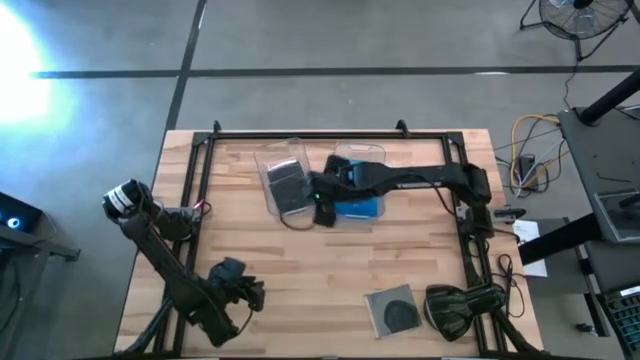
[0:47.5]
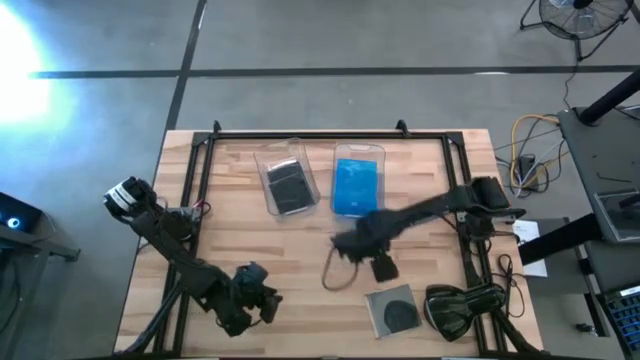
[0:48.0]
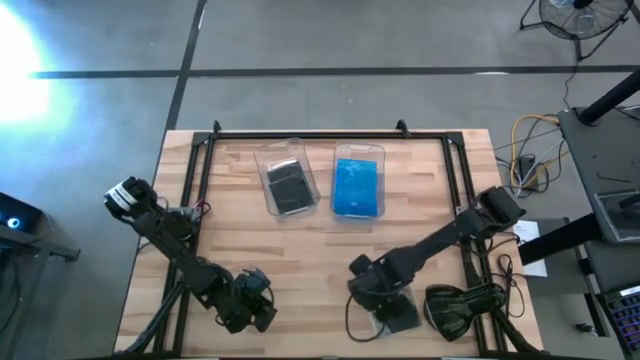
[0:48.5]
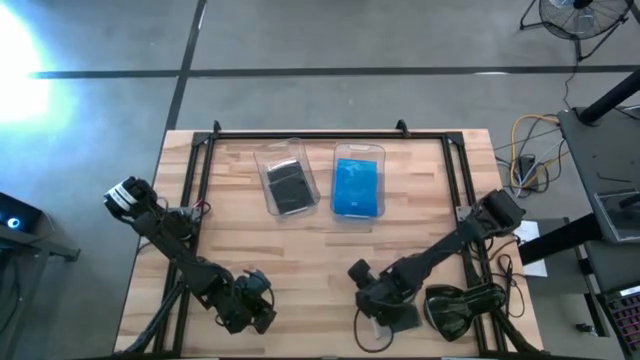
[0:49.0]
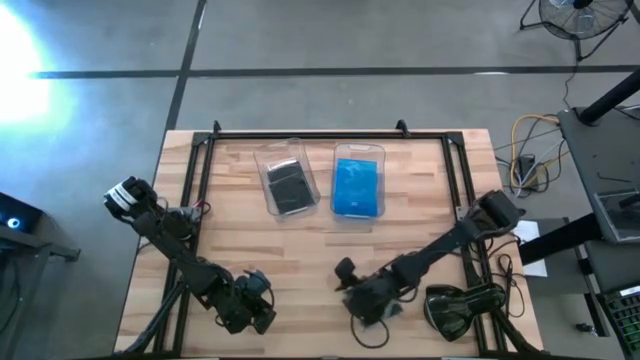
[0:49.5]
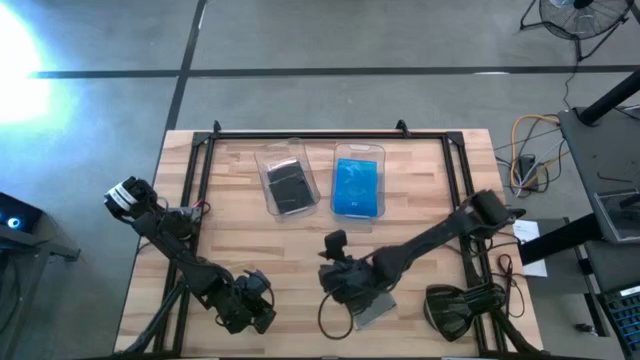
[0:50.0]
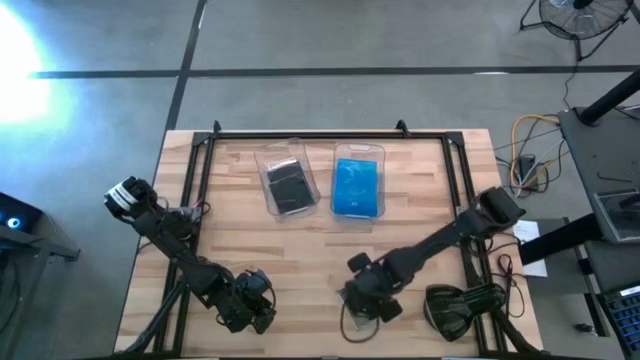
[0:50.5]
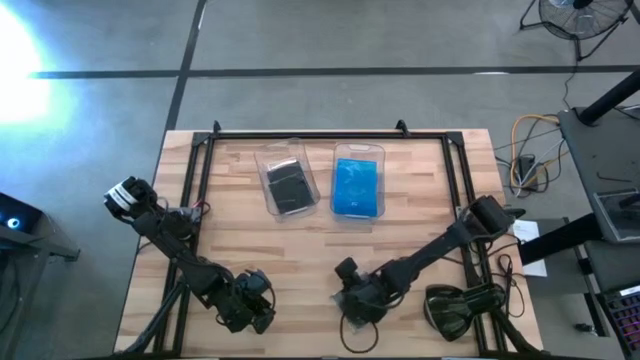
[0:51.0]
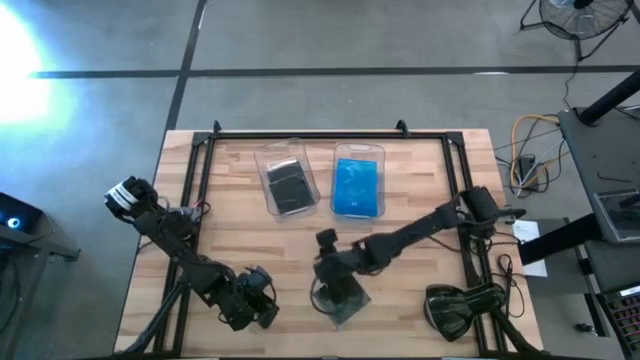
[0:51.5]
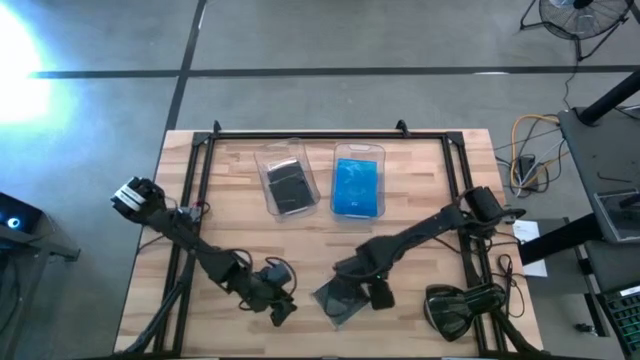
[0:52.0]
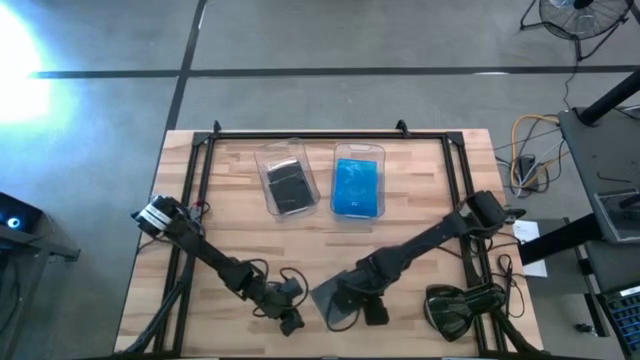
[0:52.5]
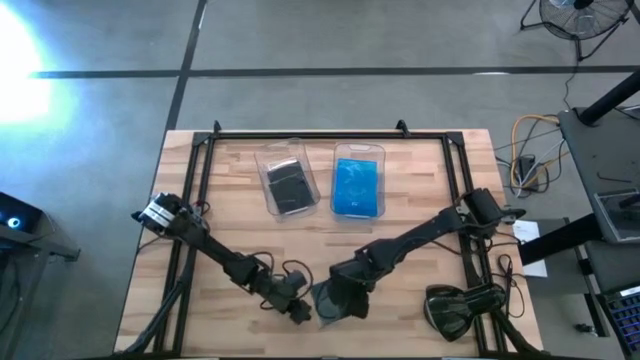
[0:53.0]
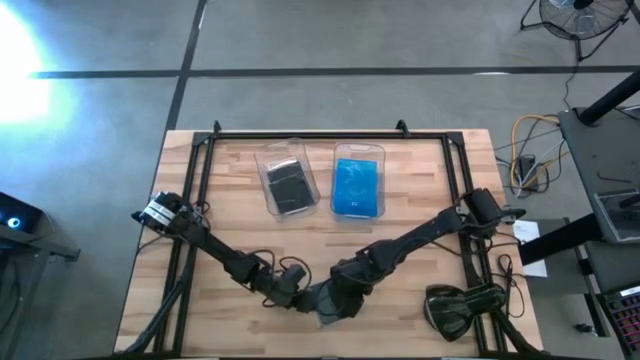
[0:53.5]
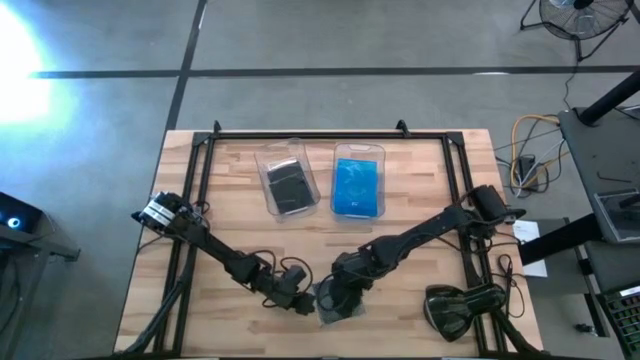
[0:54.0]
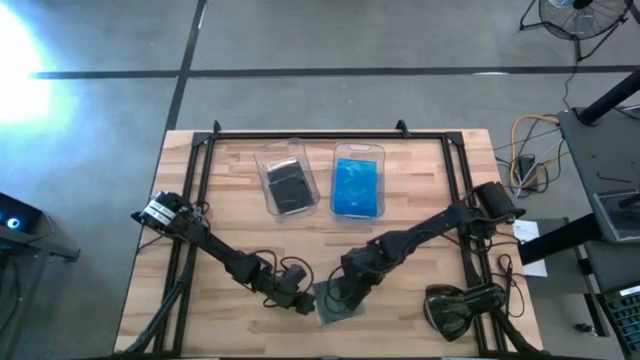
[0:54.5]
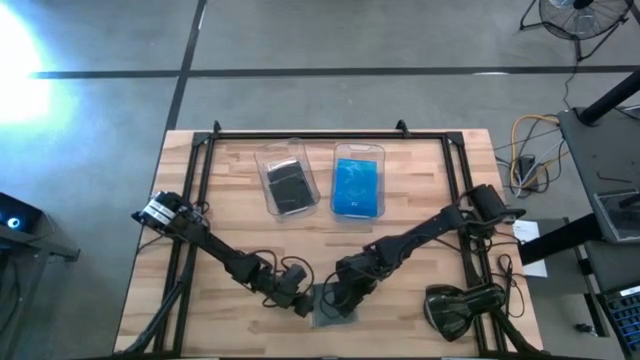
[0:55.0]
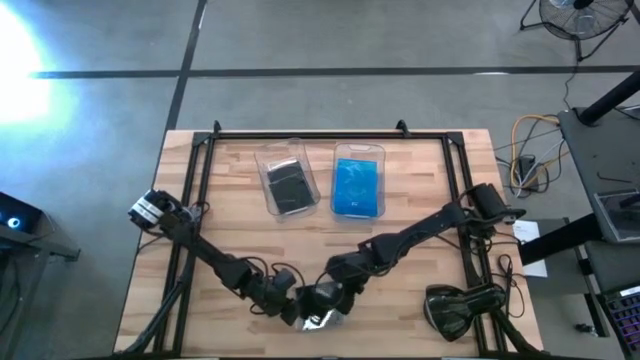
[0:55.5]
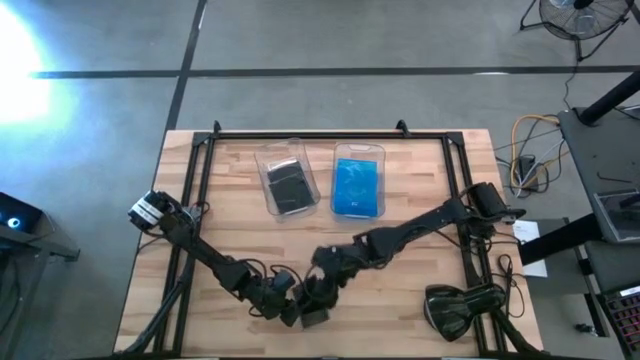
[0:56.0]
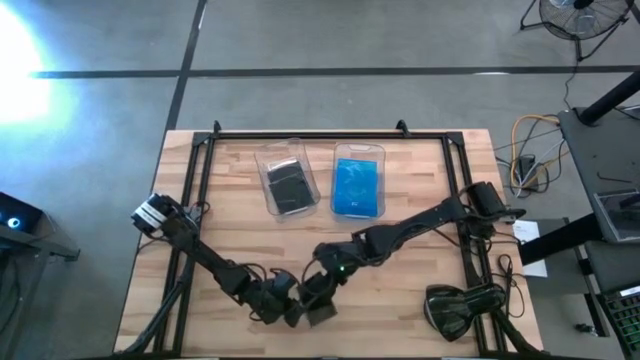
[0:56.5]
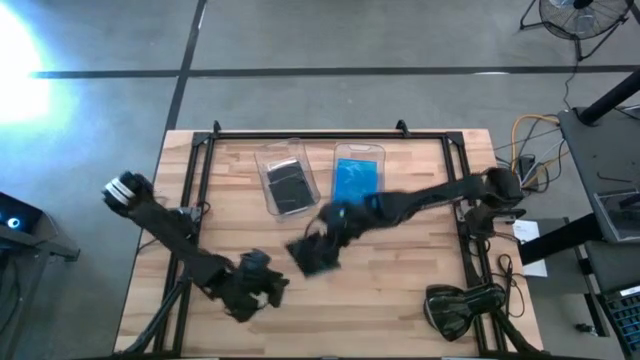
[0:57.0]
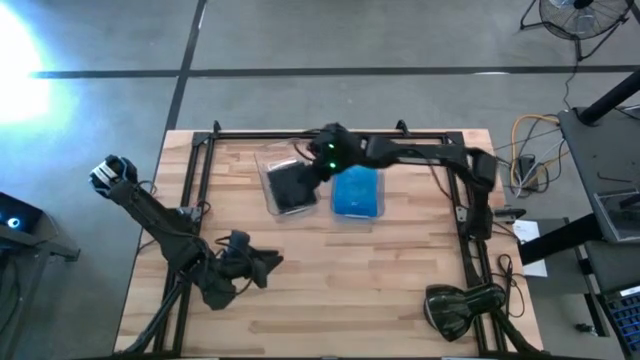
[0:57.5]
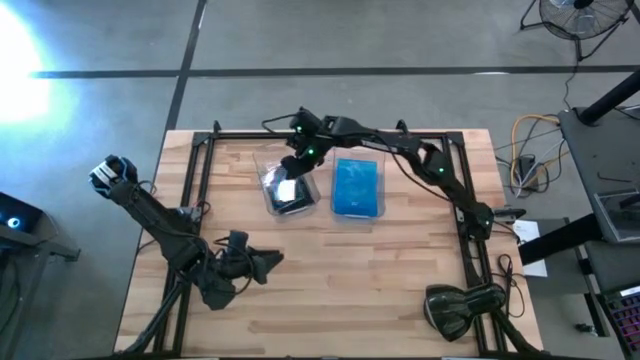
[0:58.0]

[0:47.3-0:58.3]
Task: Pick & place jewel cases by type
Put the black CD case into the left transparent bin

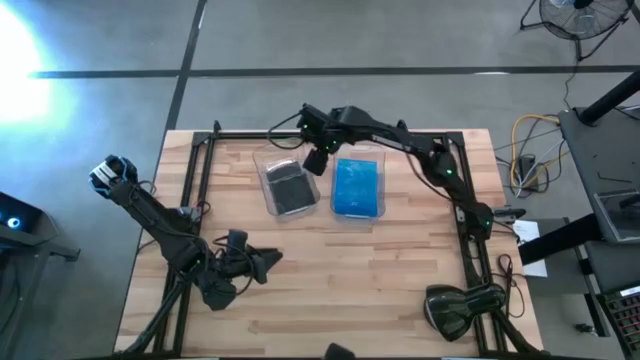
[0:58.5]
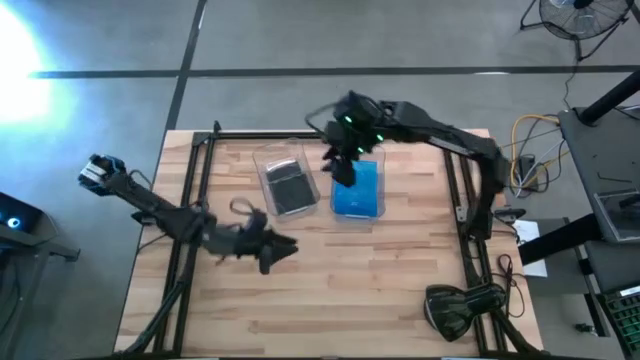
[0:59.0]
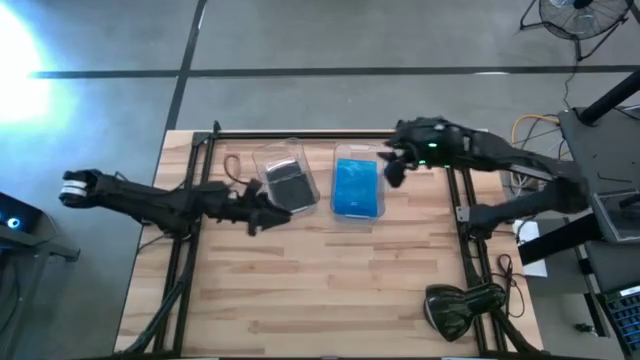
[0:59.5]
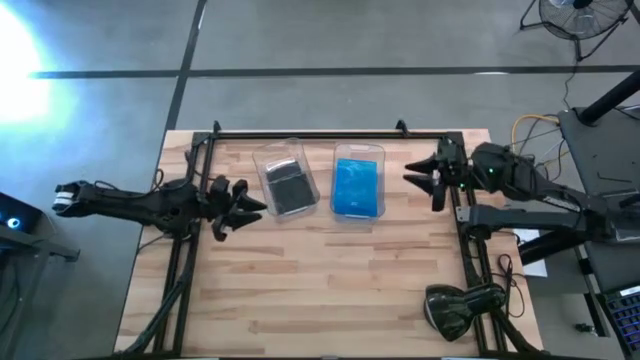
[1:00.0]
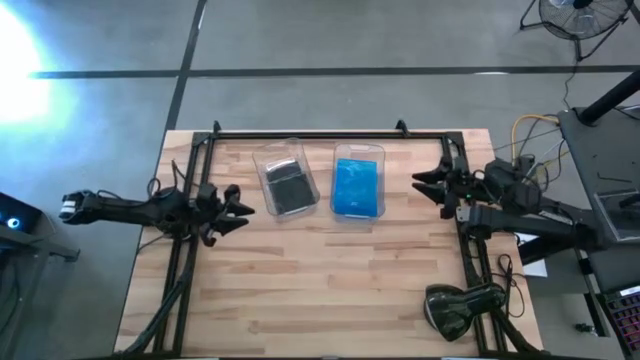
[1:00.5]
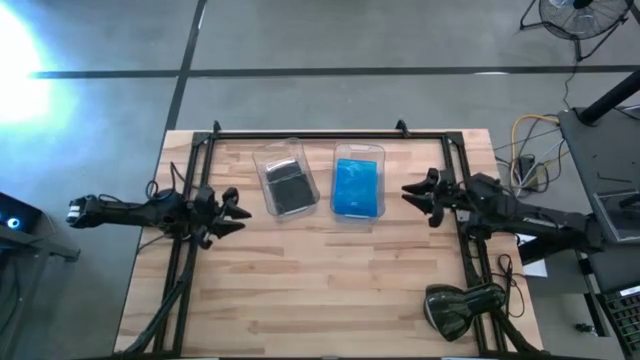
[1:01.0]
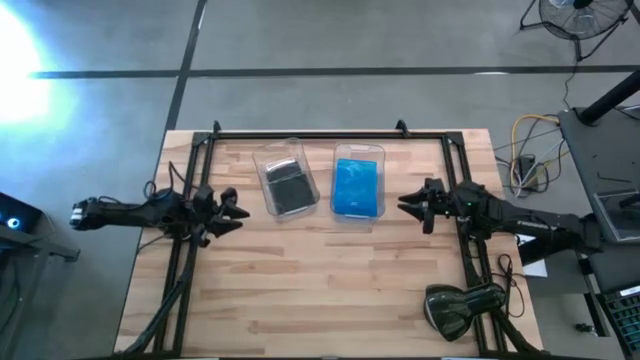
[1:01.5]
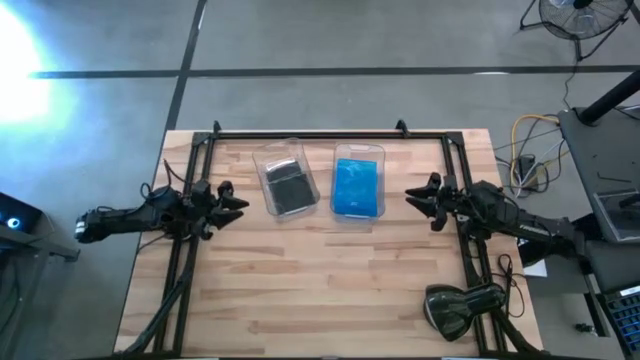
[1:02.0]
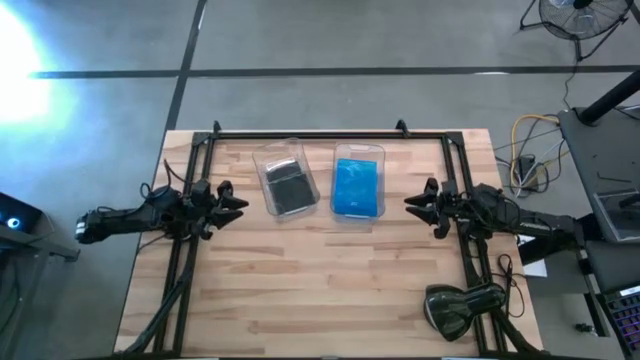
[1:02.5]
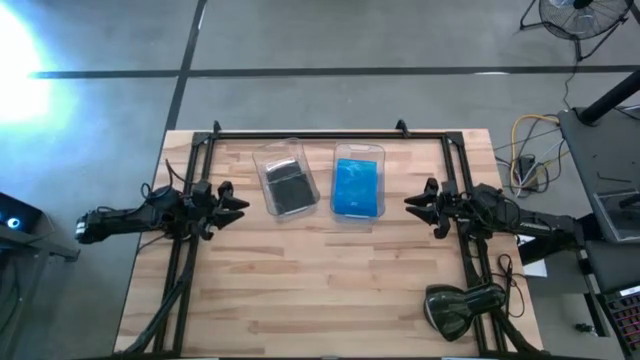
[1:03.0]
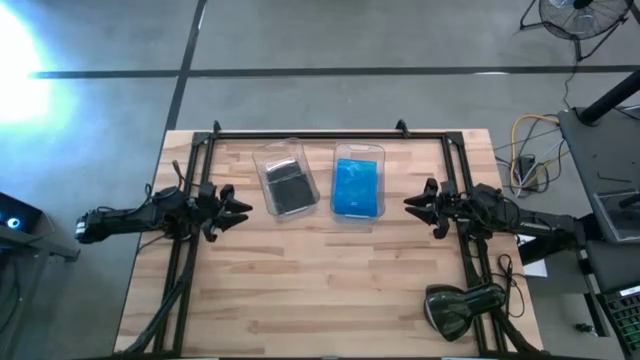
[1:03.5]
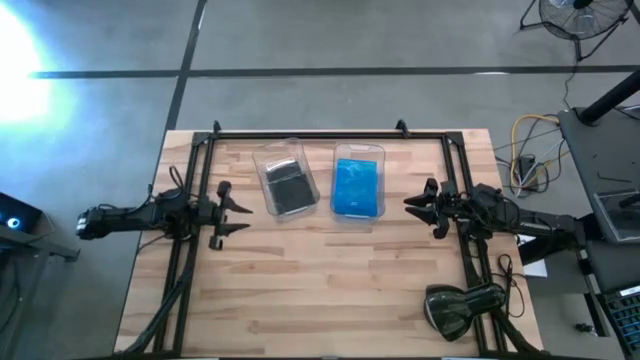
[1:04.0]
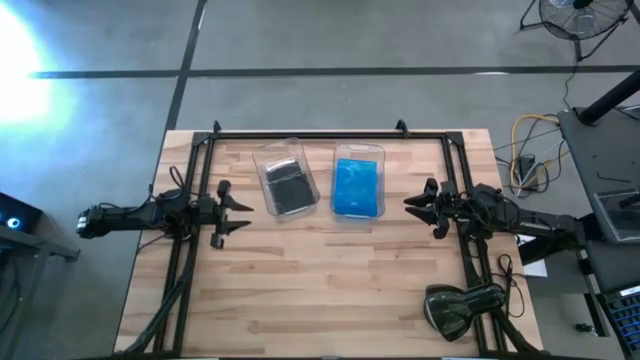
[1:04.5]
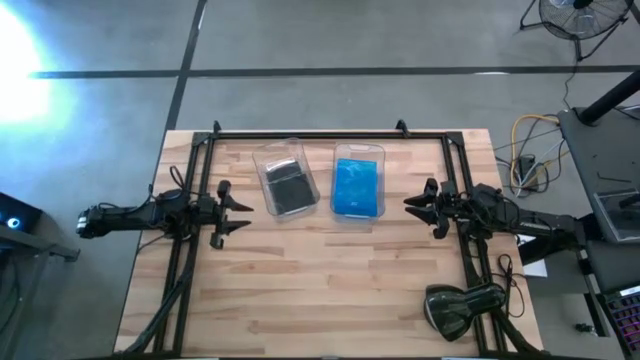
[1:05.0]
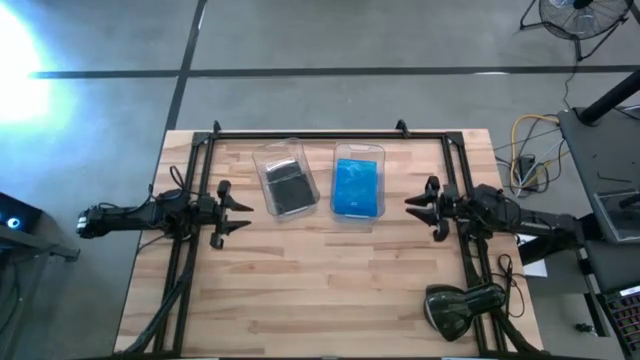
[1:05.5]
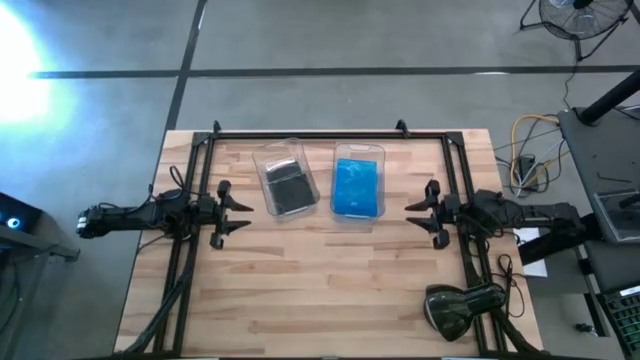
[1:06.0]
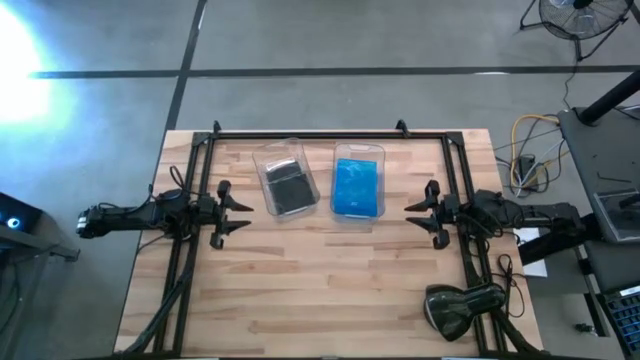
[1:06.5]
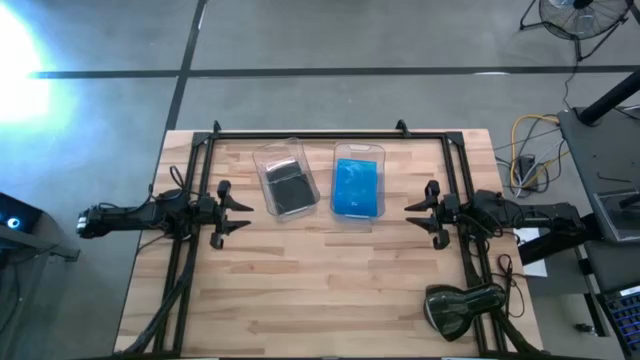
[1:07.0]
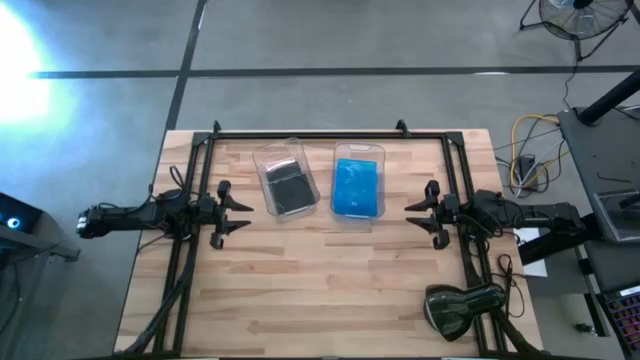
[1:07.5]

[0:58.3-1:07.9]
Return to Home Position

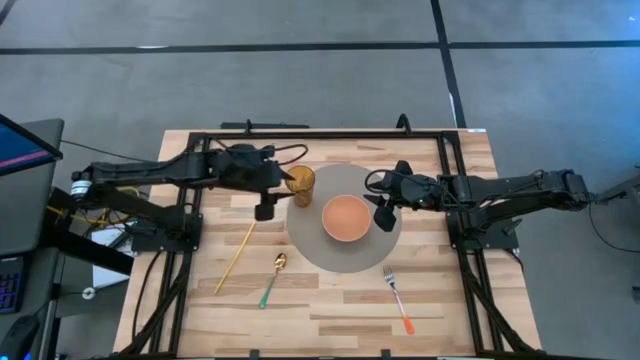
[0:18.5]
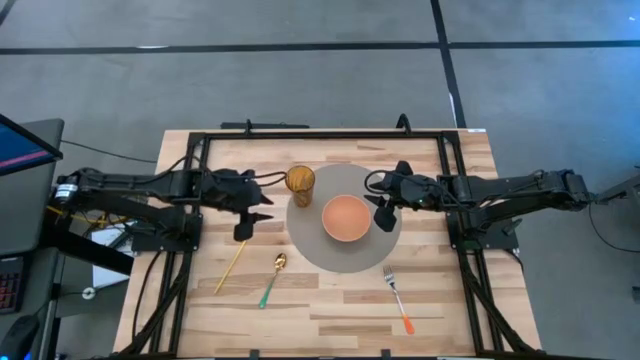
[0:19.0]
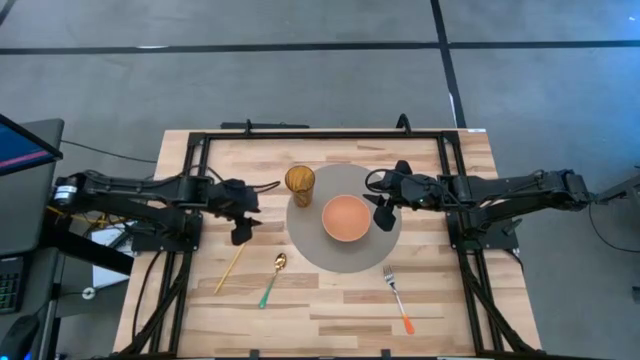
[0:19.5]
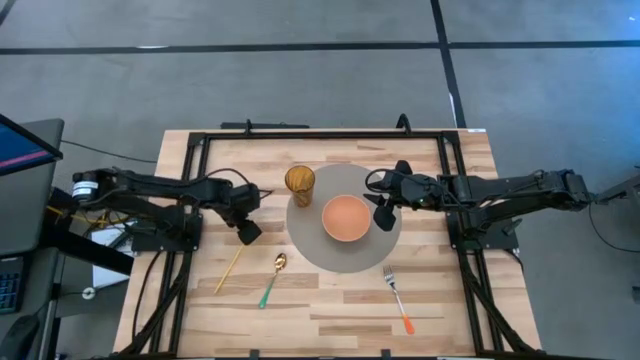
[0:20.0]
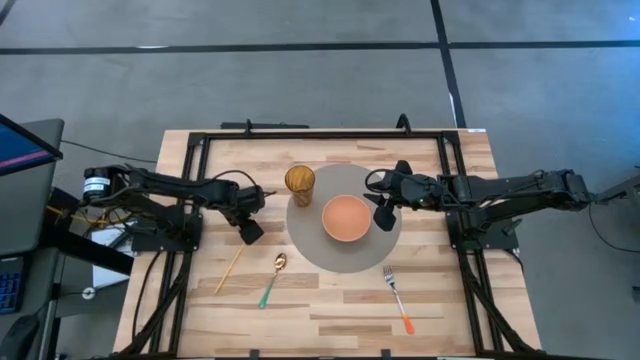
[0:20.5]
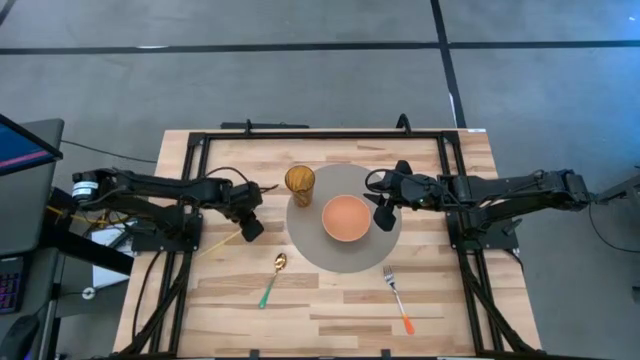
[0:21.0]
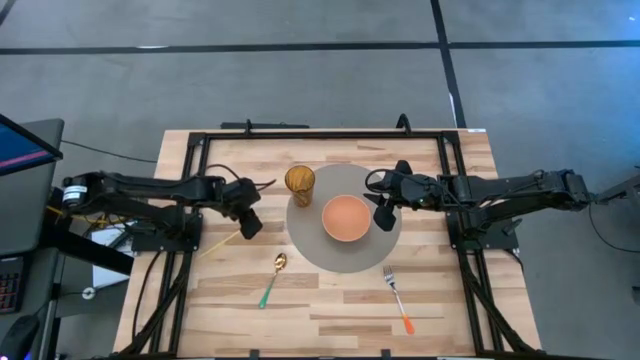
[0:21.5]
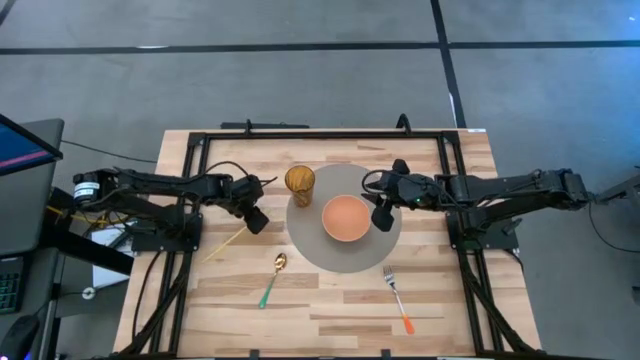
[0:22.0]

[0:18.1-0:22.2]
Task: Pick & Place Utensil
Put the yellow sipping straw into the brown cup
